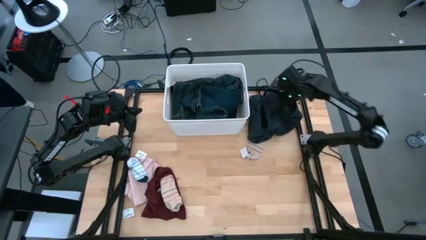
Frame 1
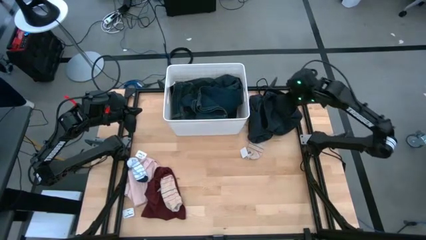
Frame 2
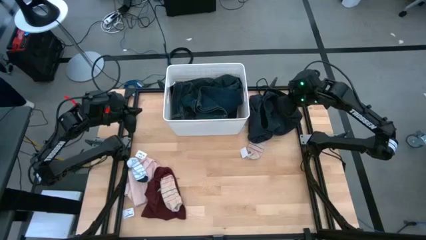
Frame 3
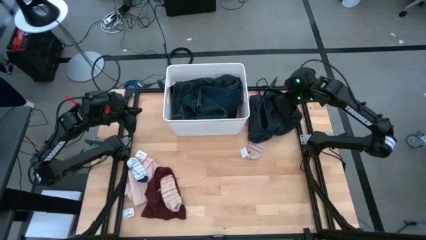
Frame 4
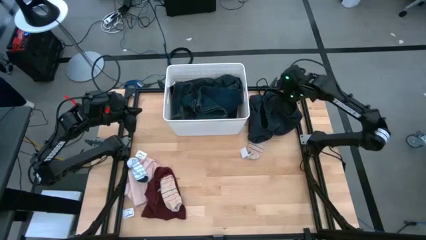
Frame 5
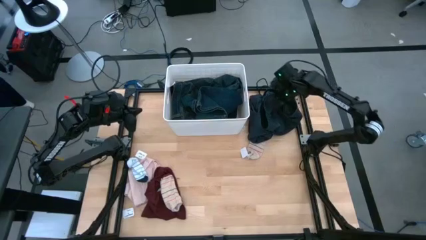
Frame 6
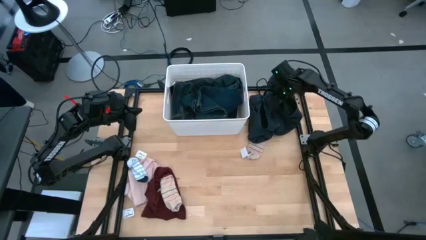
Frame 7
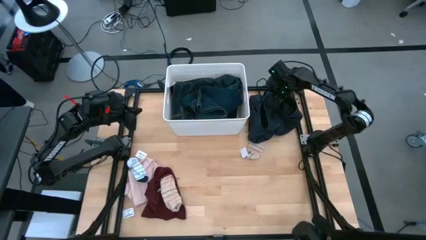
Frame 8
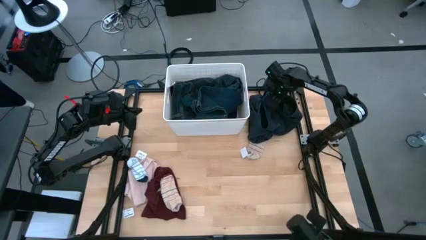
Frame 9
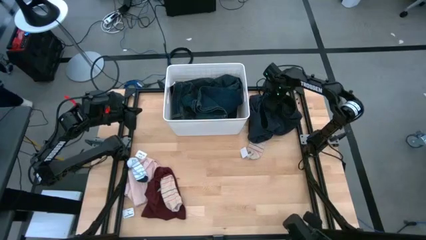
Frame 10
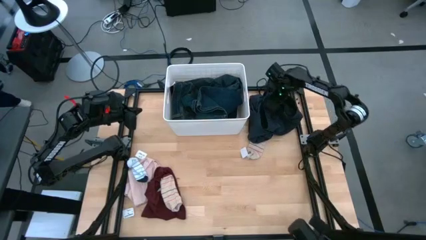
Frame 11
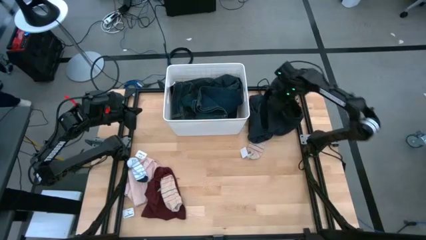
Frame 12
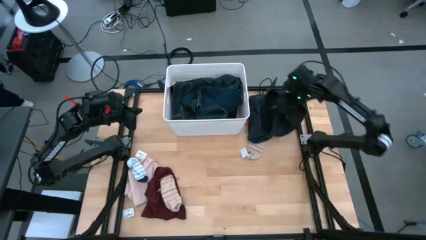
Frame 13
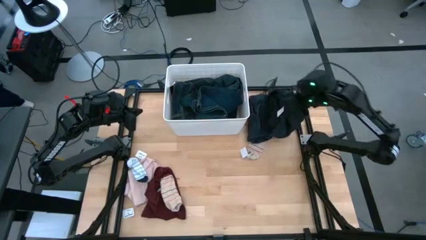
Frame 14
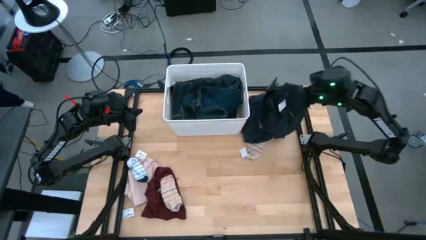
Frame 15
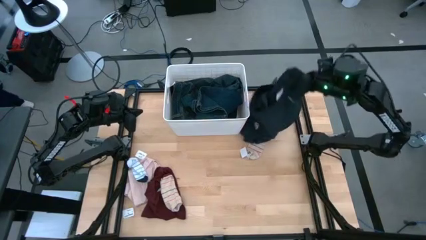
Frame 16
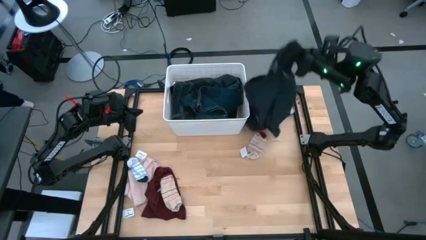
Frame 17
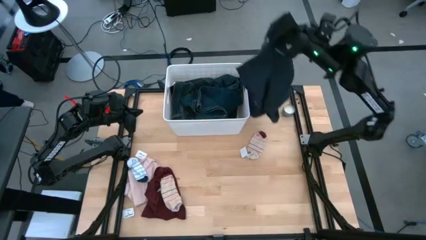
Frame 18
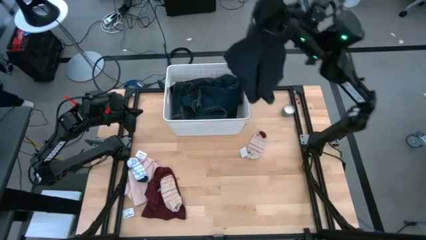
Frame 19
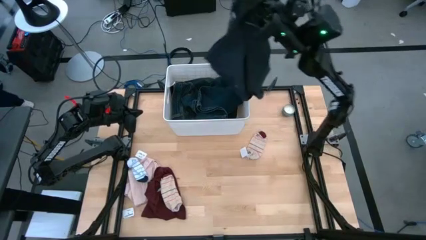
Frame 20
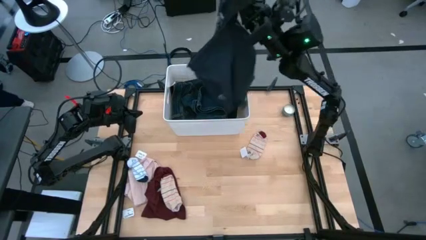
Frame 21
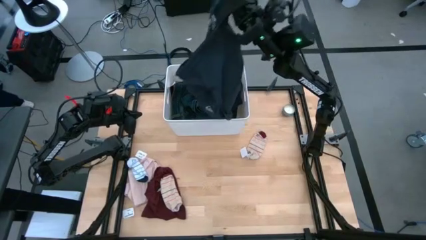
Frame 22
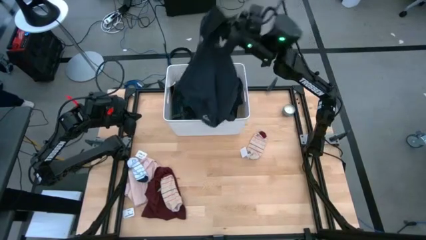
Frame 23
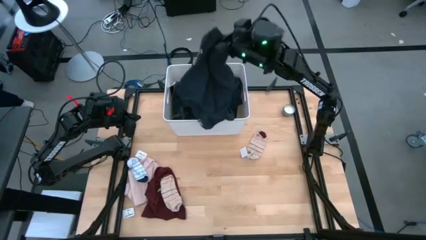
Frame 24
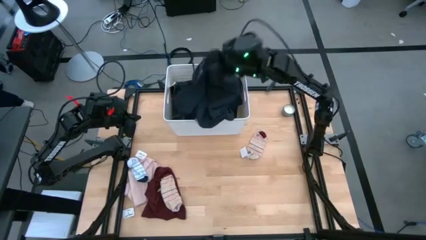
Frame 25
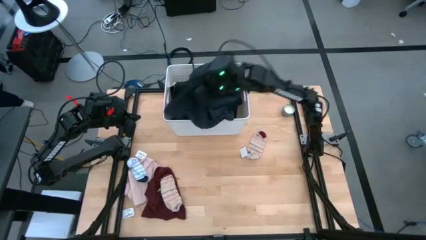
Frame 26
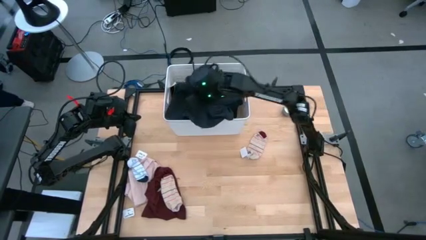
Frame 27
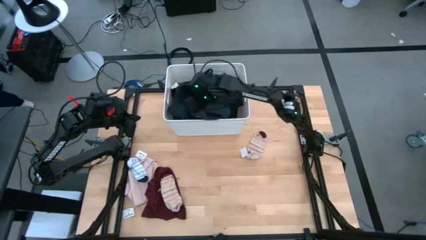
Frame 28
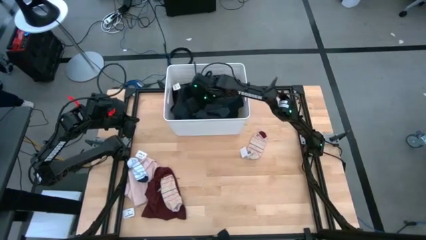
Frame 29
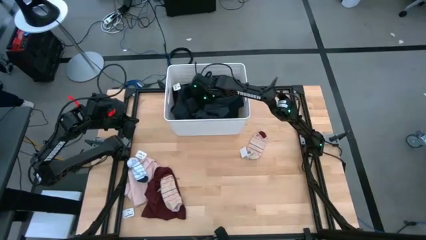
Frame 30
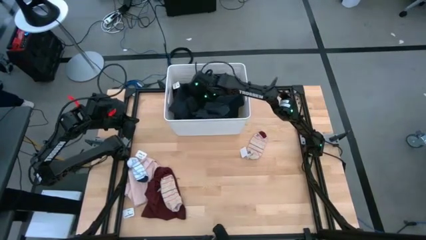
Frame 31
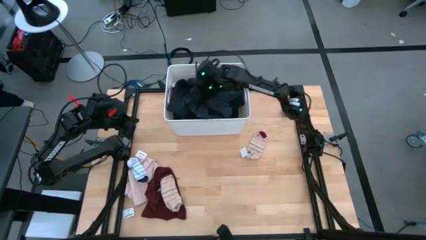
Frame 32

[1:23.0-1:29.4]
Task: Sort clothes
Put the dark blue shorts into the white laundry bin

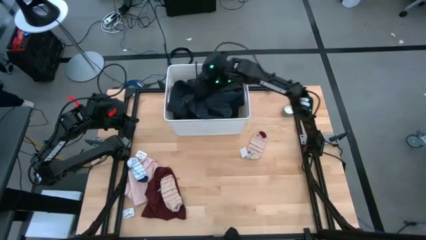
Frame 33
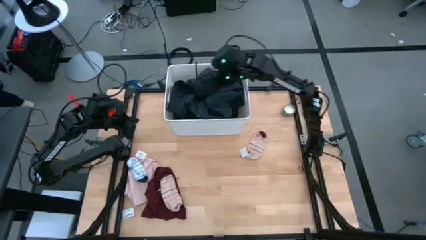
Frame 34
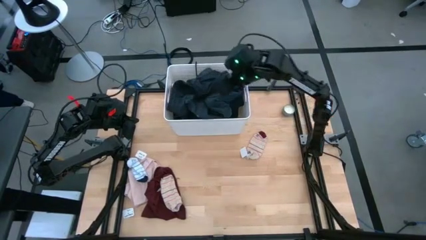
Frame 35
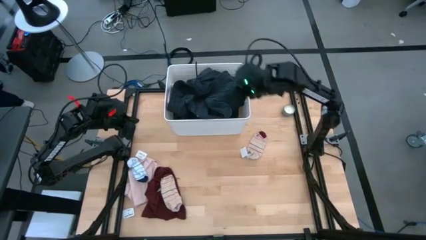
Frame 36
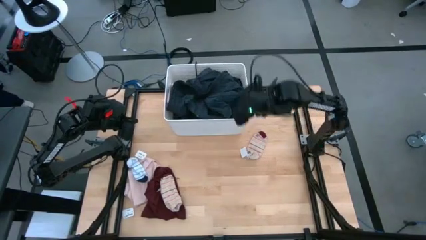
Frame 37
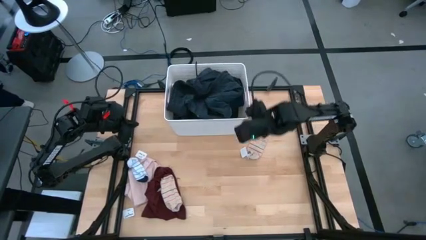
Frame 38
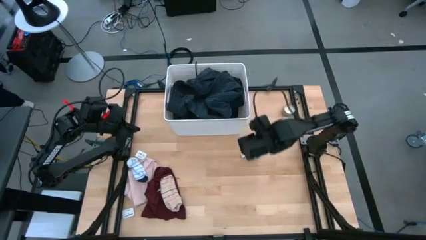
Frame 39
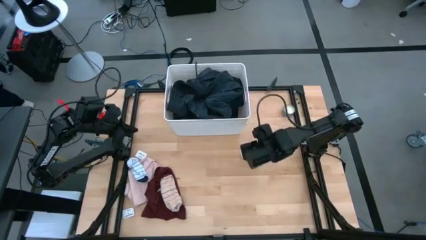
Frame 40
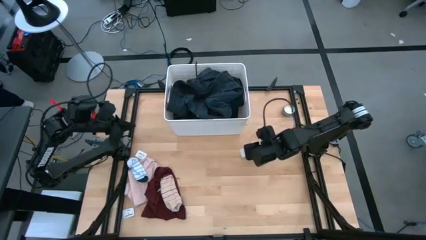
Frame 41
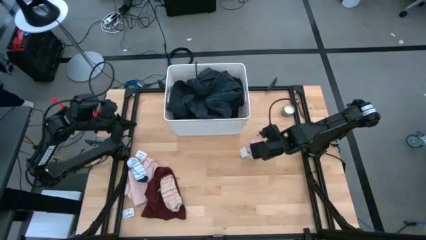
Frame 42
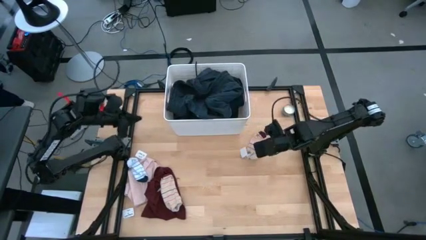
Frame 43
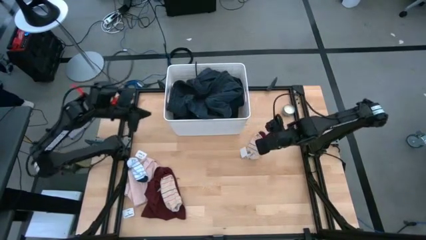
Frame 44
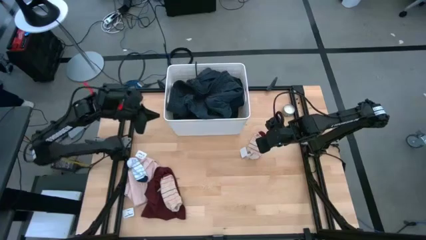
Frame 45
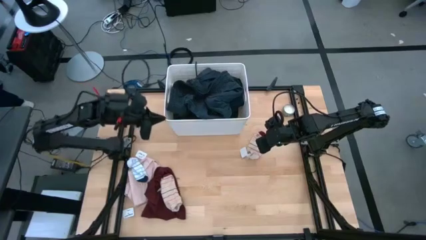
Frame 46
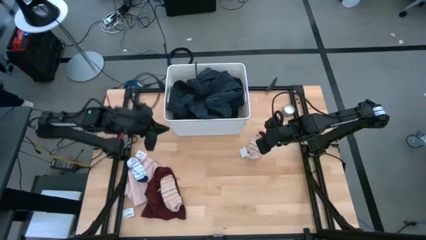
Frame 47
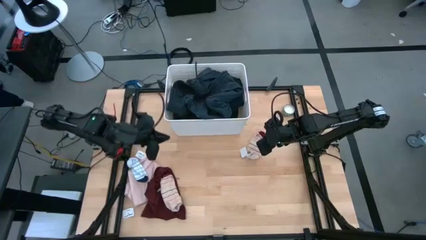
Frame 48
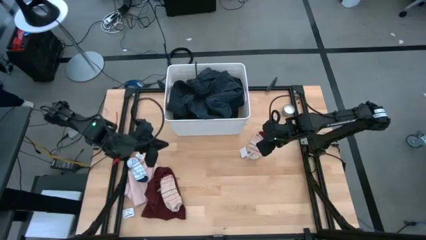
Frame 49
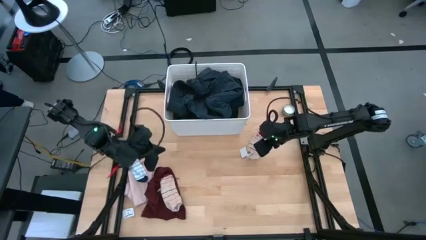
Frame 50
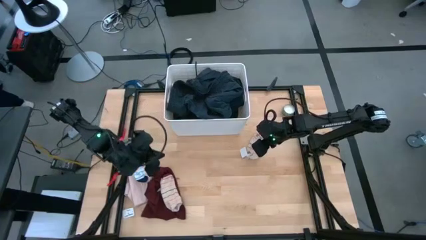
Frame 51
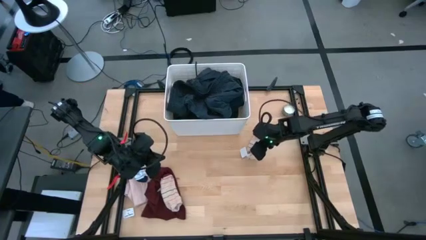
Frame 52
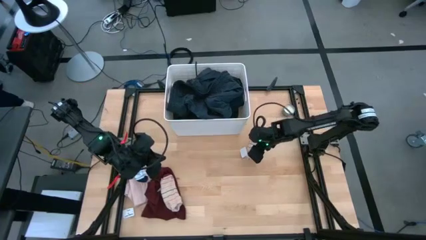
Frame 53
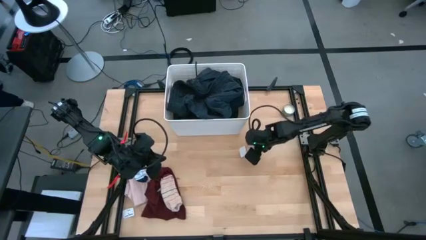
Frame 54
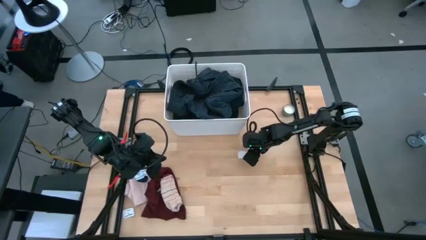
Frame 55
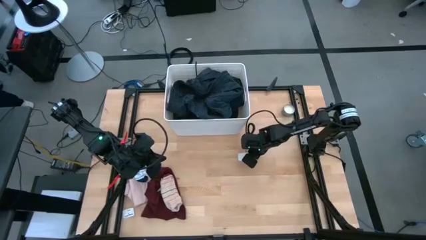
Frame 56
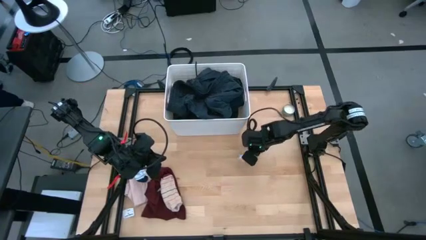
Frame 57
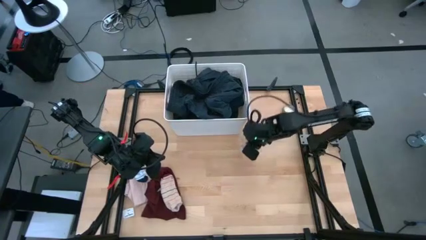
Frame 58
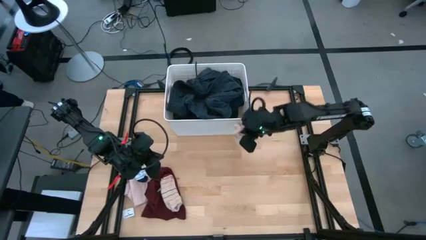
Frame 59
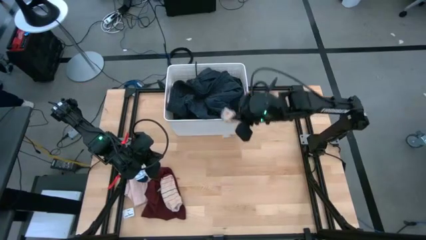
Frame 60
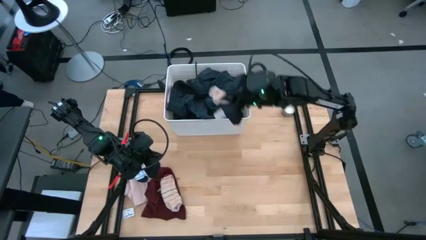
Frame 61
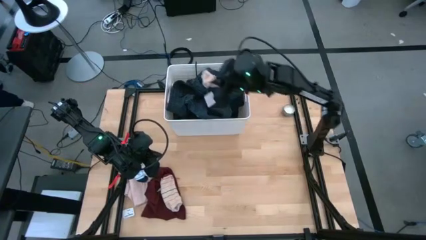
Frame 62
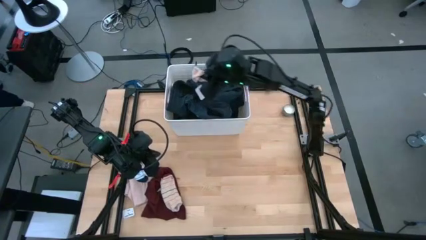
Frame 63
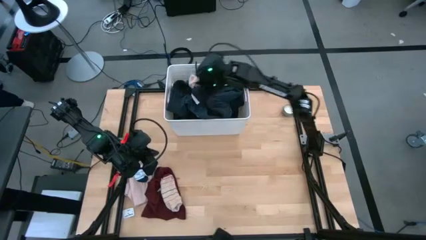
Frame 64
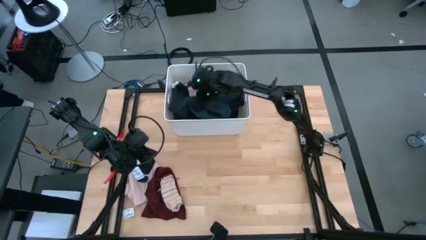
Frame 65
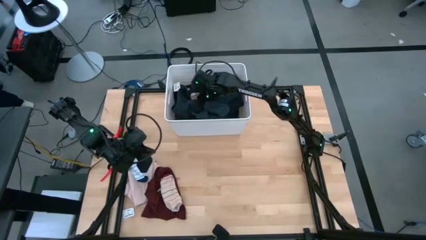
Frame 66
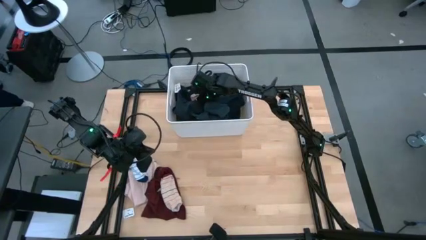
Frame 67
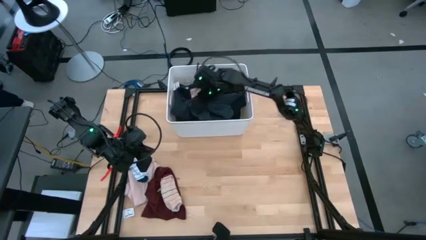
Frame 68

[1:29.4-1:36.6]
Put the brown sock into the white laundry bin

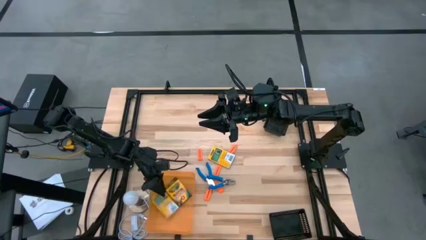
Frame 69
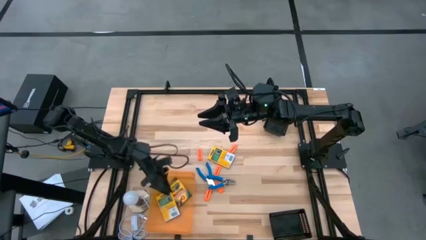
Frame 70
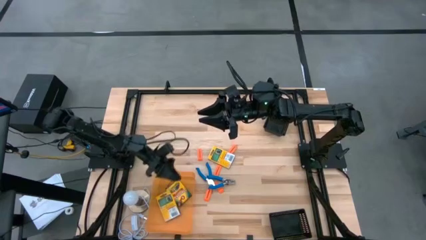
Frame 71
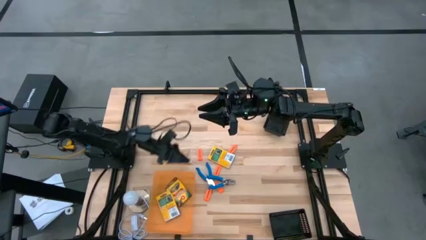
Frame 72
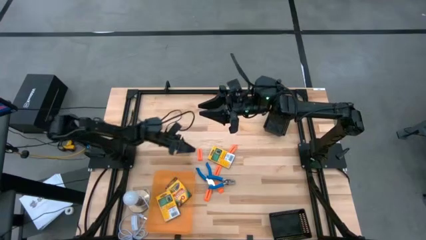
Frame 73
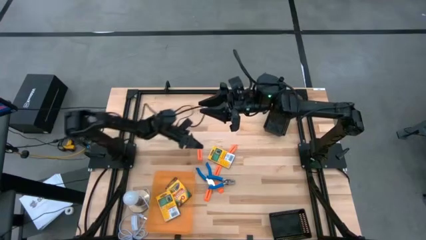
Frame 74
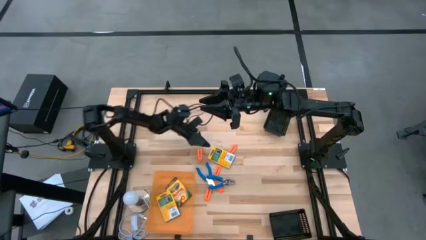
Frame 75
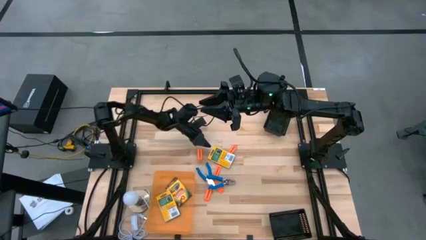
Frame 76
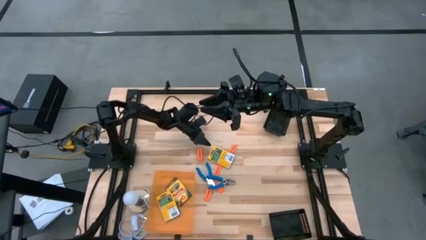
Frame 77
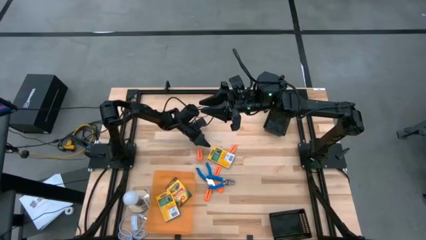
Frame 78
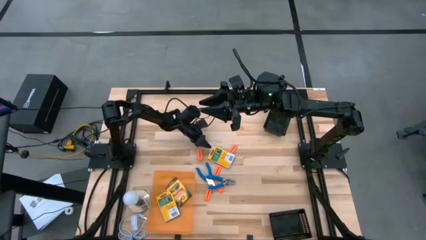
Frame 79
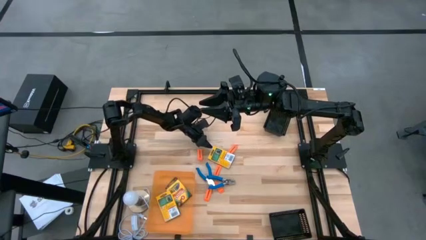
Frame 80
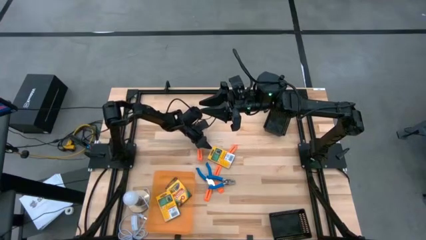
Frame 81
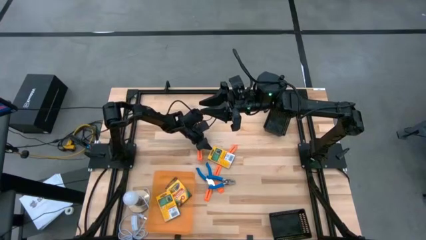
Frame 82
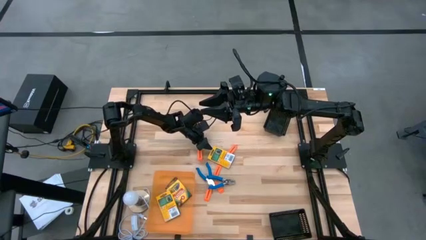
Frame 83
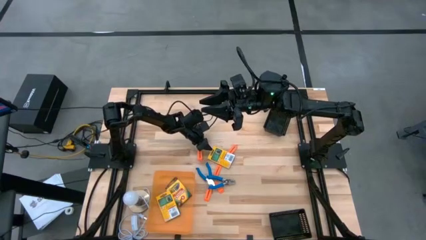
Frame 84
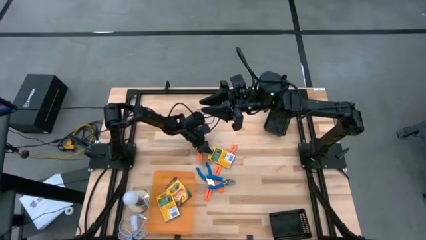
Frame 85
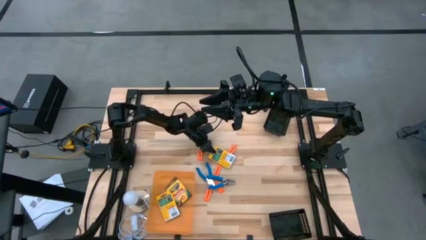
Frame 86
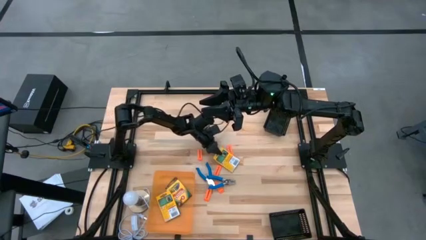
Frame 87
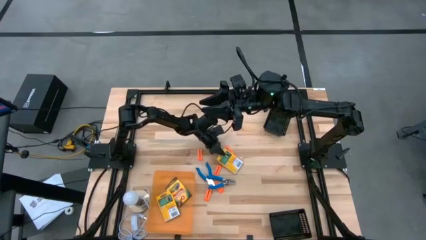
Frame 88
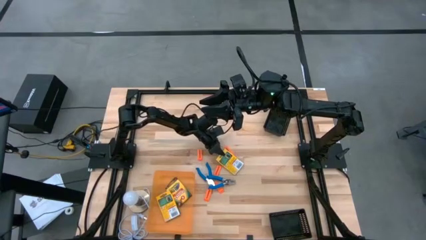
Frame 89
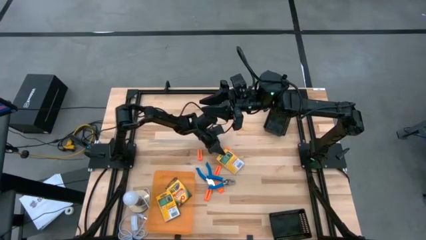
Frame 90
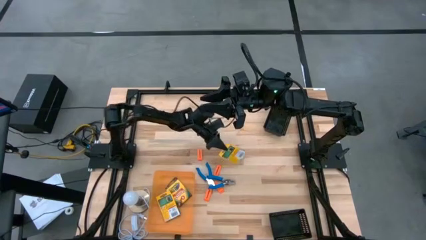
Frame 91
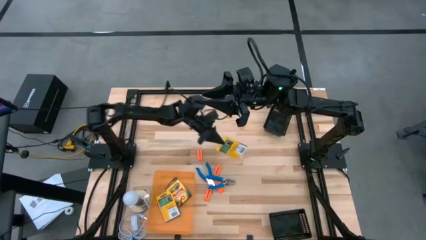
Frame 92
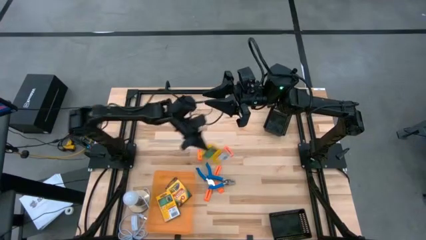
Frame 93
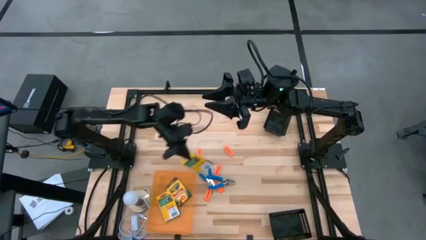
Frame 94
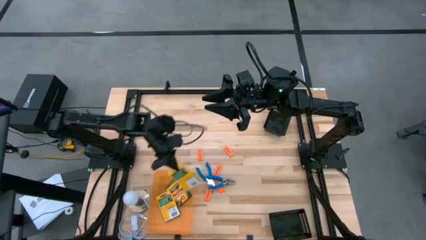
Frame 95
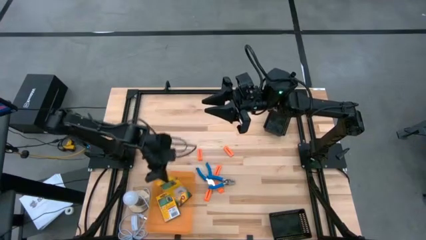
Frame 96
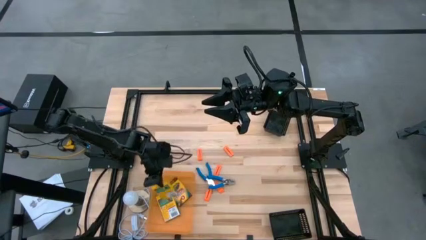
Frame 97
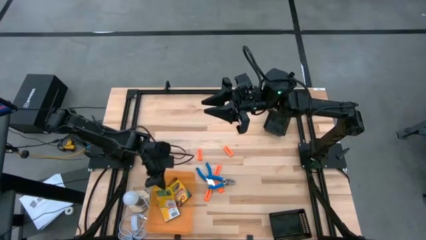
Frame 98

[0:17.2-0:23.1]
Task: Pick & Place School Supplies
Put the yellow crayon box into the orange bin
